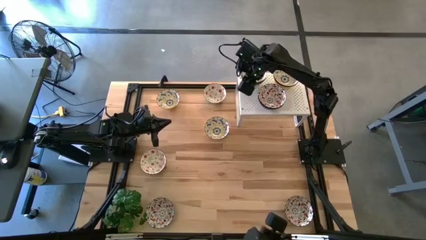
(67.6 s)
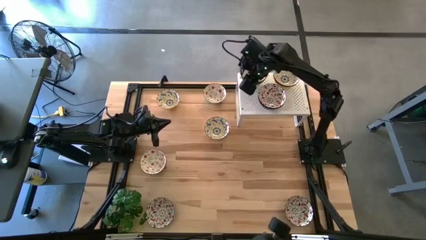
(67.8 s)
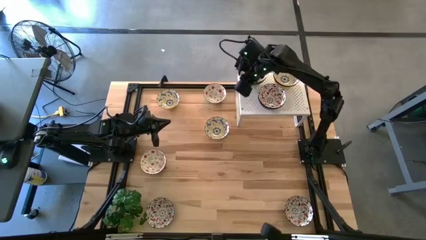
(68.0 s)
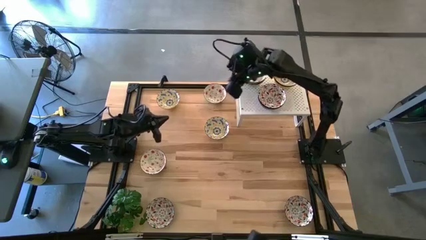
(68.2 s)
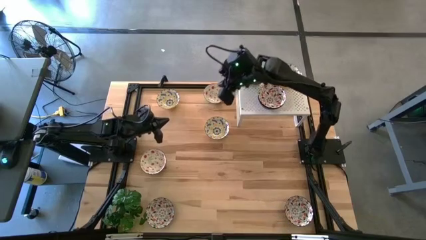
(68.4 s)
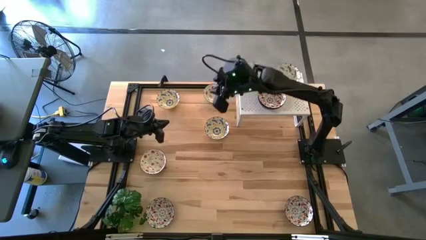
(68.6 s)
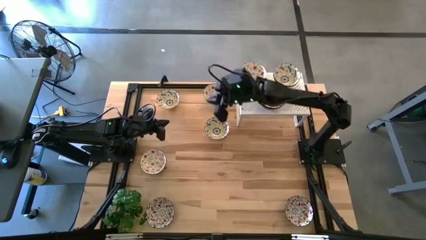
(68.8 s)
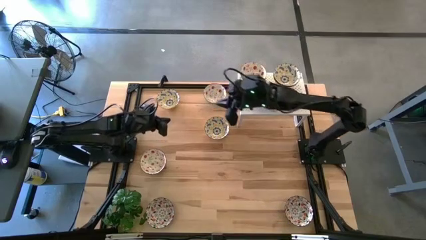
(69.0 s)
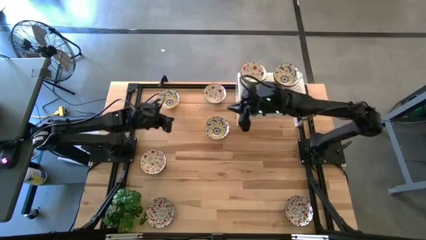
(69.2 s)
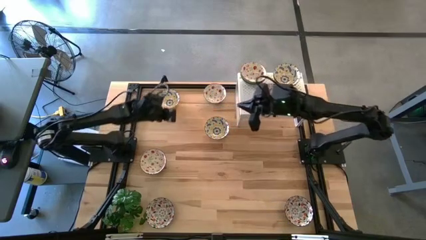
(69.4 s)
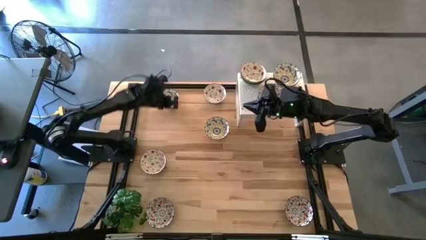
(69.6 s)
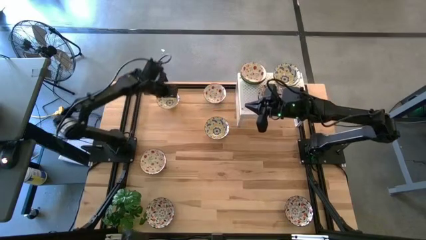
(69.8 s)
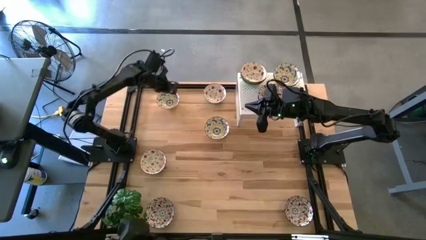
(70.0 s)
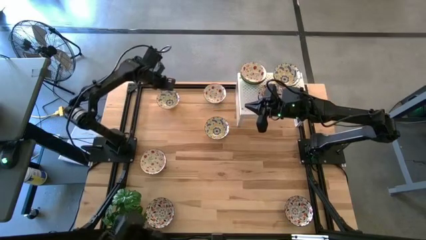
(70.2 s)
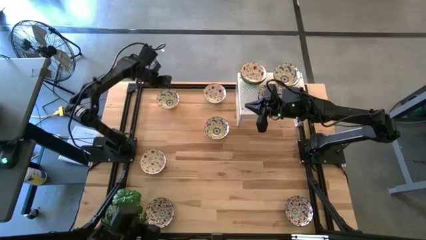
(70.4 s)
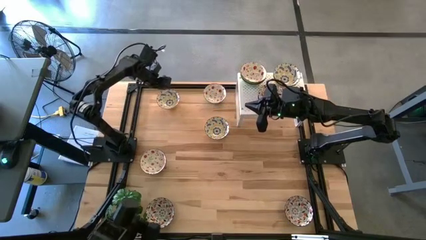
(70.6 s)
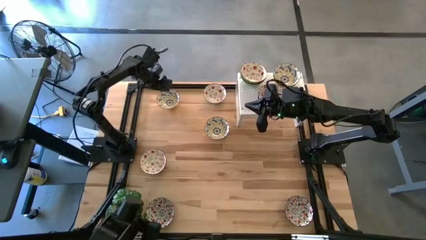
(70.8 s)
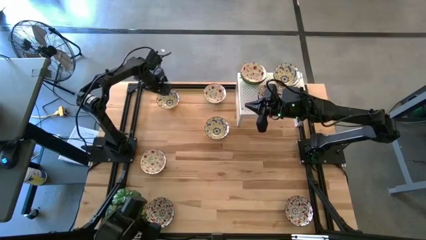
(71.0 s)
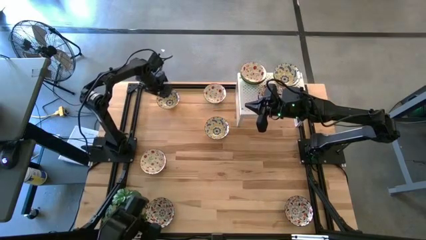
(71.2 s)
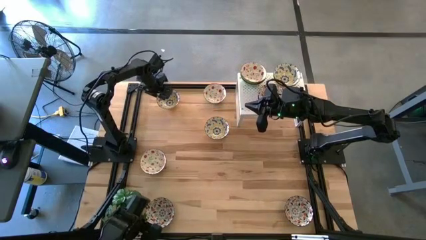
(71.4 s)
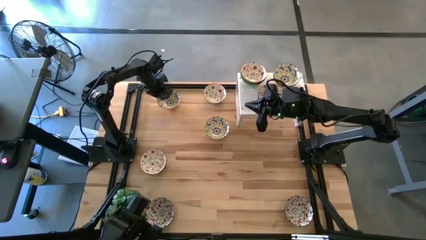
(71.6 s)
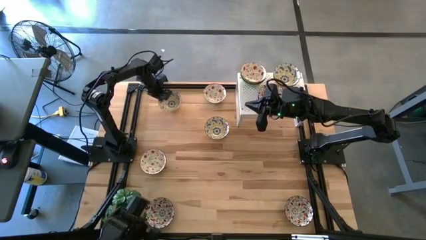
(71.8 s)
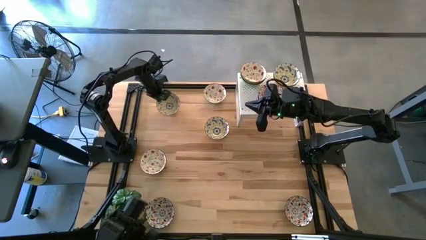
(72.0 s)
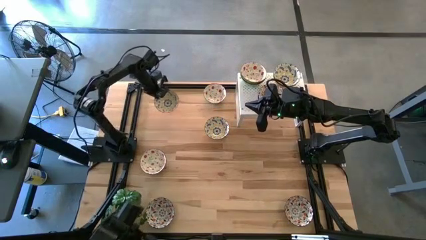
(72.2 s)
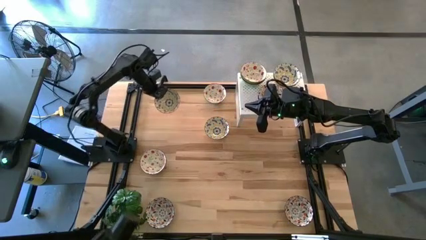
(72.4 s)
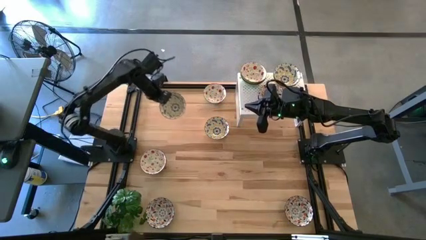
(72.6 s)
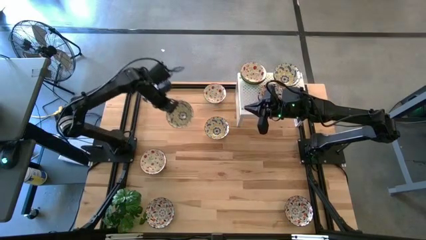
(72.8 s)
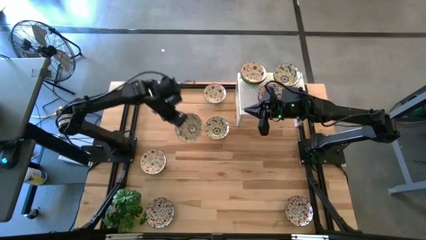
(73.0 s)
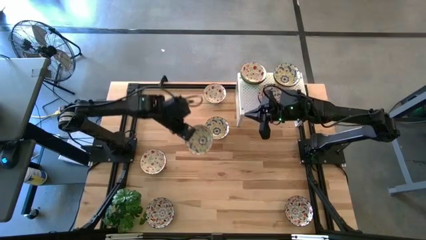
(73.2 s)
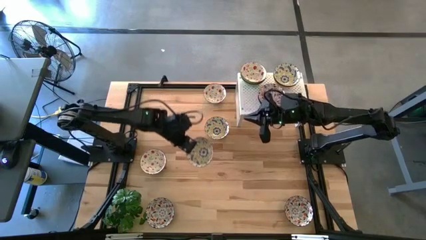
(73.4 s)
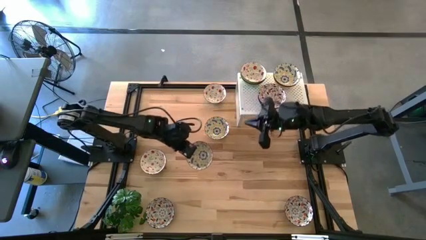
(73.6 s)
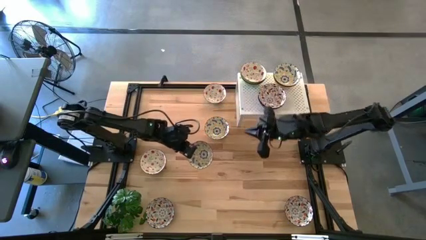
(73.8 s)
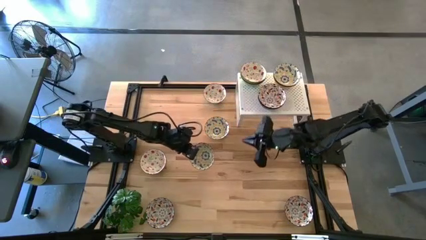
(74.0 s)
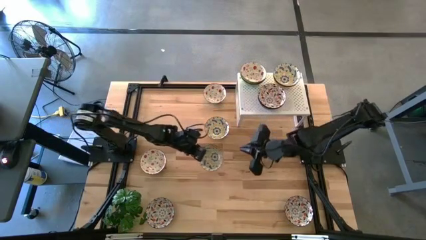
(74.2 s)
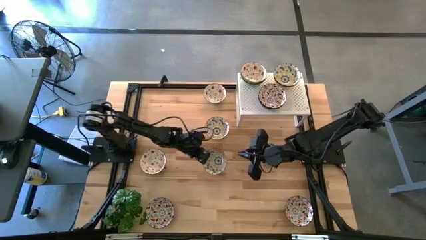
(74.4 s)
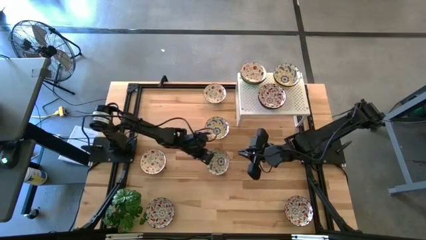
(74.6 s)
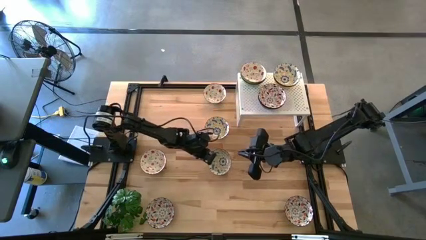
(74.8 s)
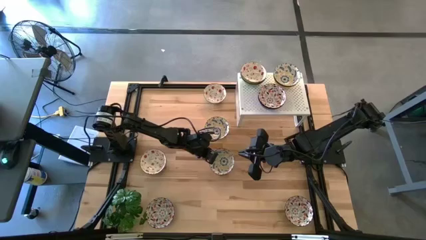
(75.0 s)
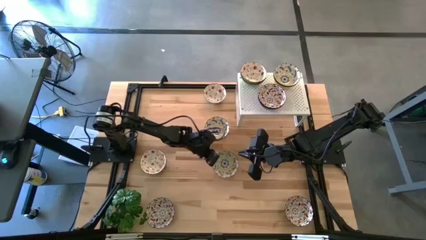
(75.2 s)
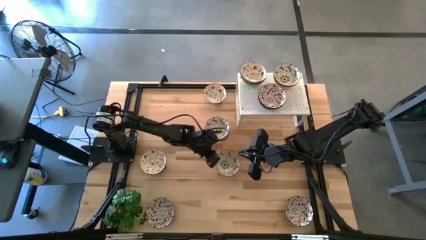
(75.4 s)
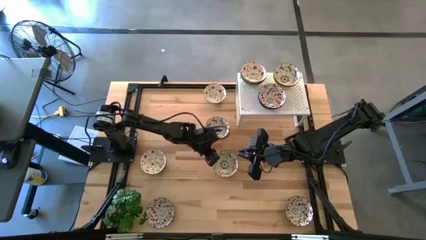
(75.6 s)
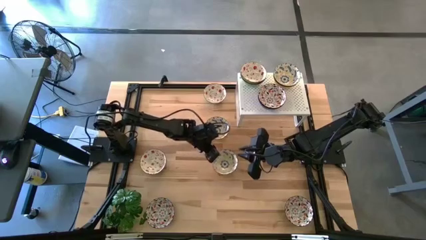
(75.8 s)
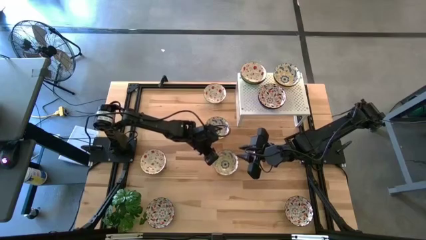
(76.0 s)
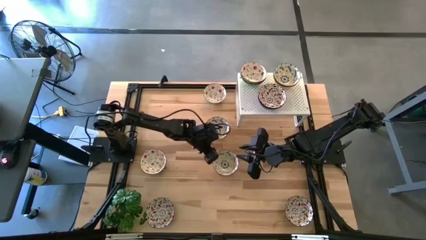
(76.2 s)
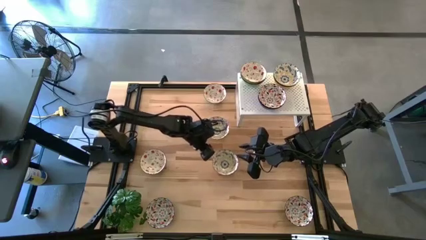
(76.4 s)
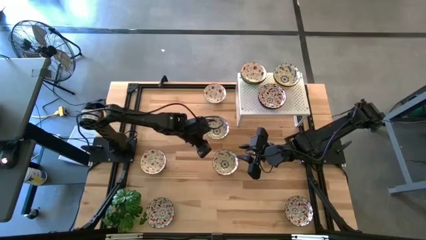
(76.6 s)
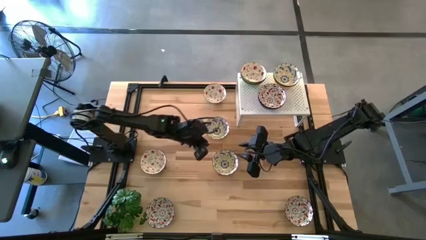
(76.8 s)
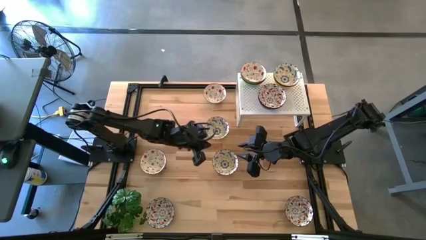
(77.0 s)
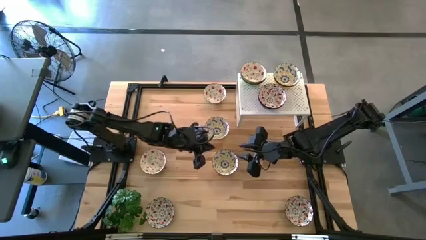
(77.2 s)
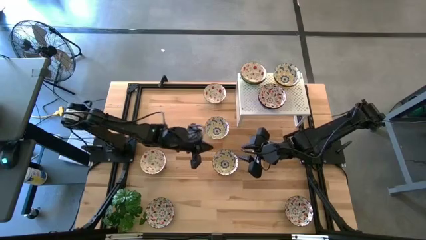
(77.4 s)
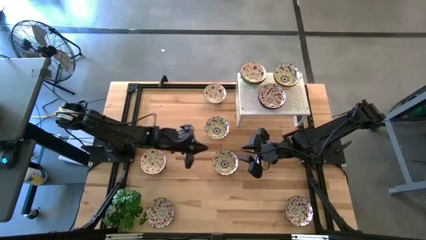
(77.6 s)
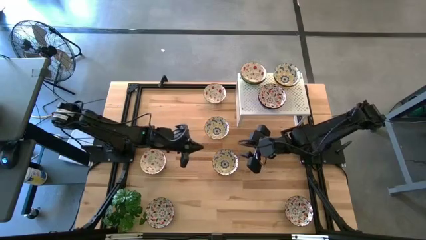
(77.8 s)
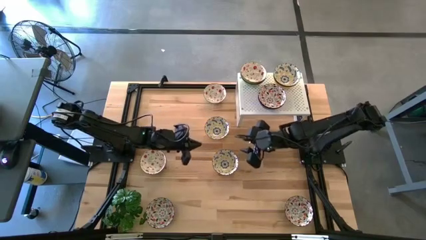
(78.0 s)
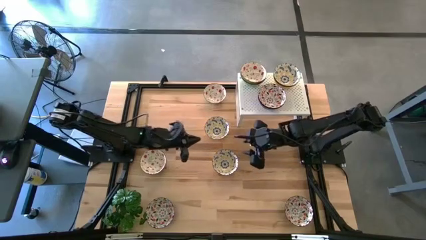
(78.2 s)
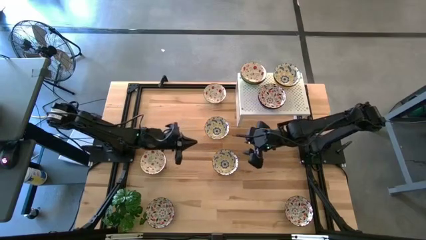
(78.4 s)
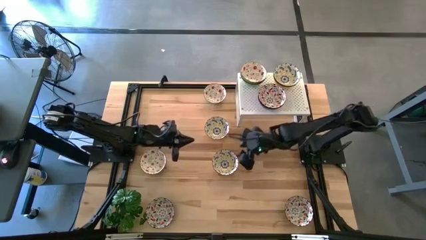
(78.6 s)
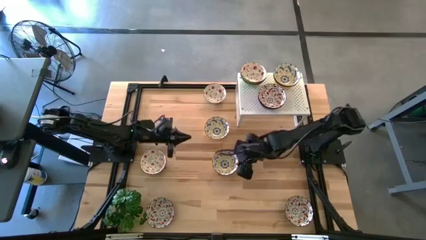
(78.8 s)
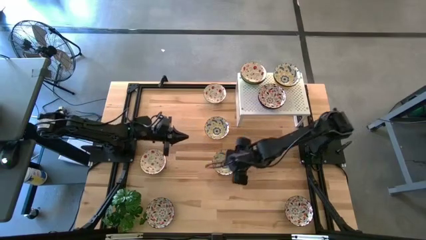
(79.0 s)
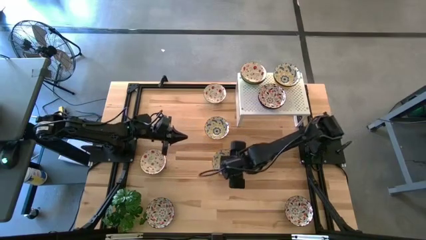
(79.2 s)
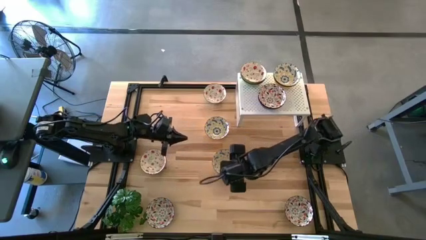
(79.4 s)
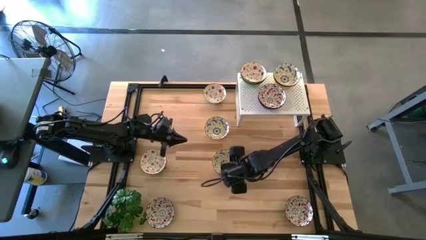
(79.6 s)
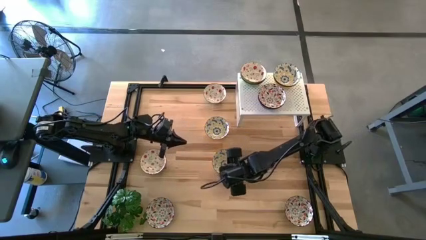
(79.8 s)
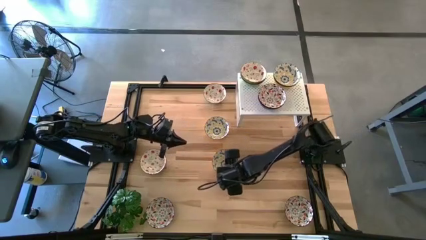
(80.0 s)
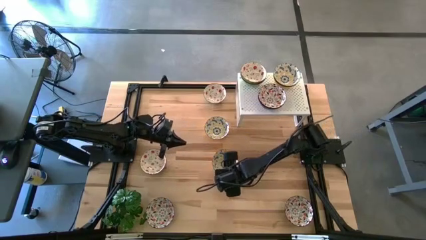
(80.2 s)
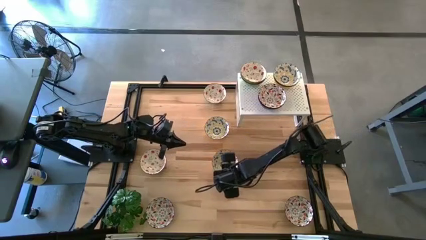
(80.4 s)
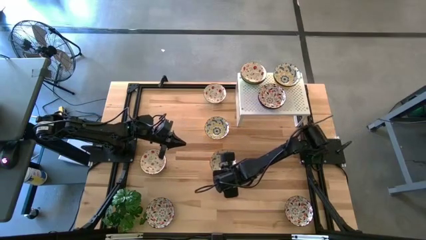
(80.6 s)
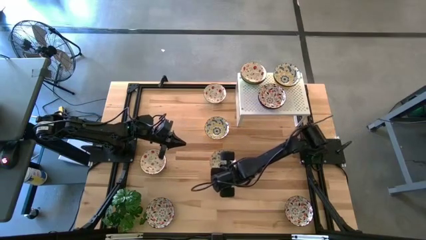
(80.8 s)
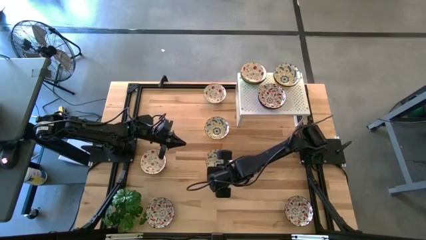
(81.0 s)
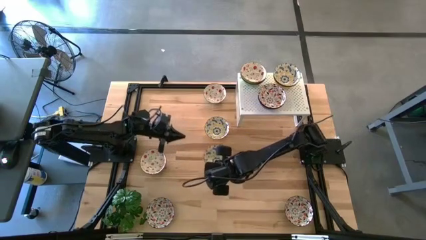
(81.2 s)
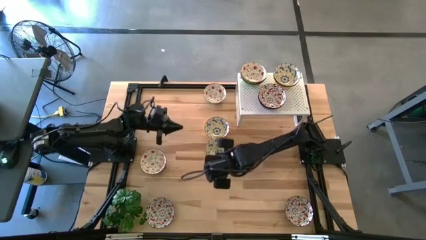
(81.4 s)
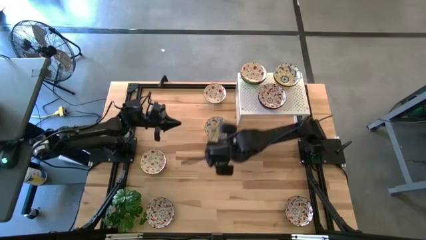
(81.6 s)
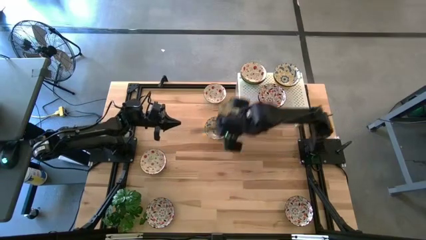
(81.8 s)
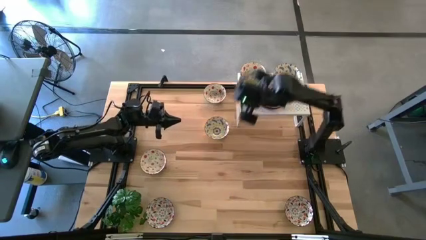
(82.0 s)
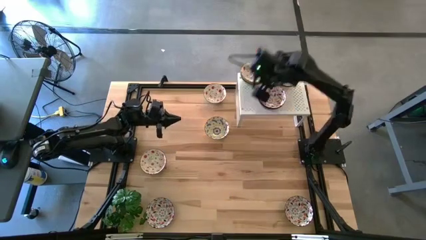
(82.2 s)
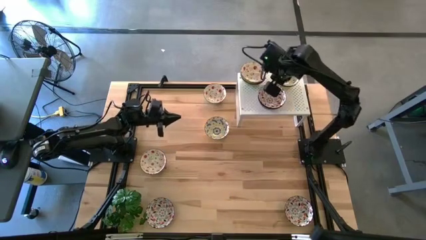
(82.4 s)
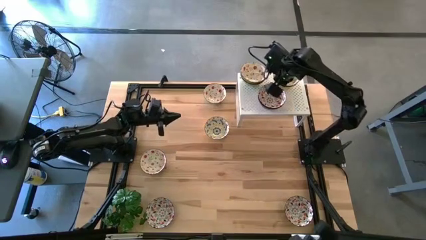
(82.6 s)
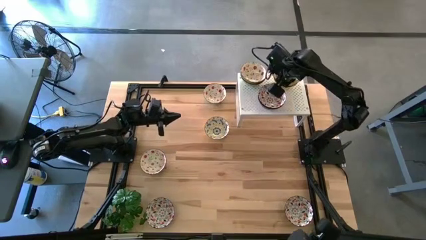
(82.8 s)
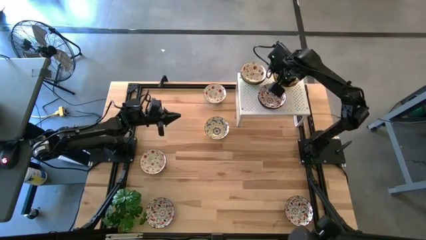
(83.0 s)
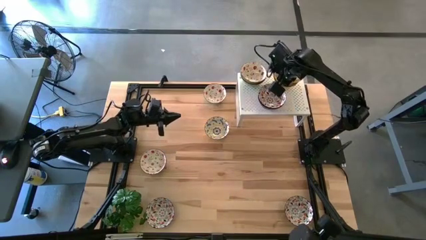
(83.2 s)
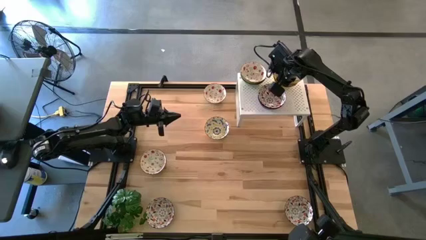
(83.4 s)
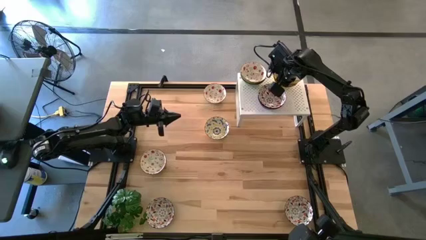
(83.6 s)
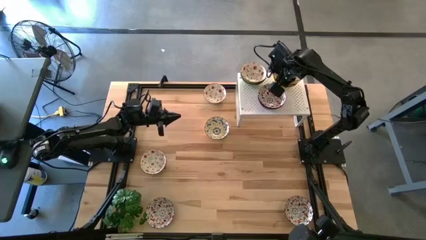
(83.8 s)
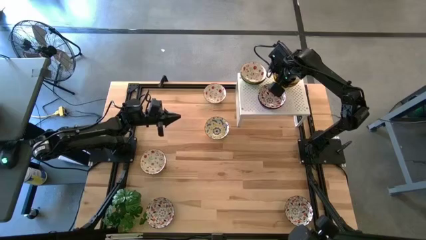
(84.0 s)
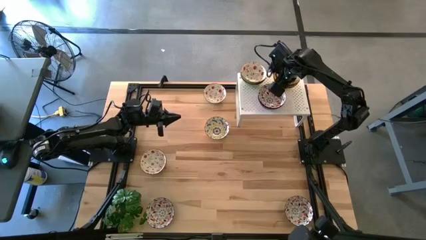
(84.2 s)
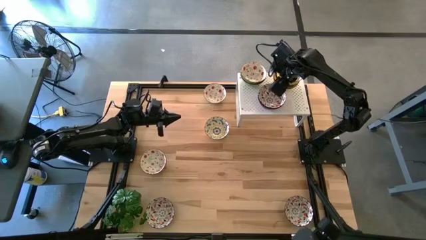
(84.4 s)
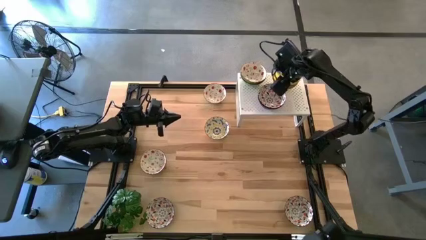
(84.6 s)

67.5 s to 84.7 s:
Task: Pick & Place Mini bowls
Stack the yellow patterned bowl on top of the yellow patterned bowl on the shelf
